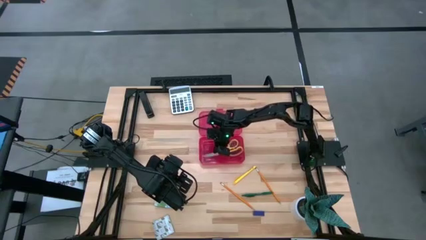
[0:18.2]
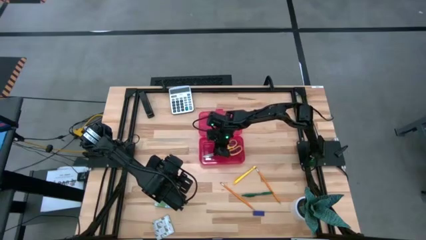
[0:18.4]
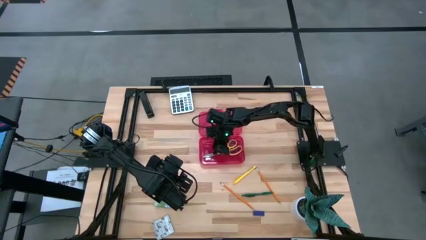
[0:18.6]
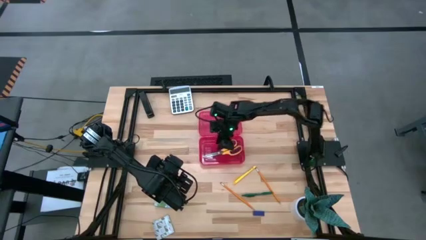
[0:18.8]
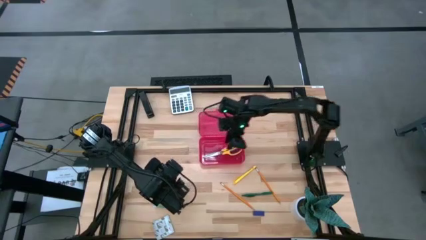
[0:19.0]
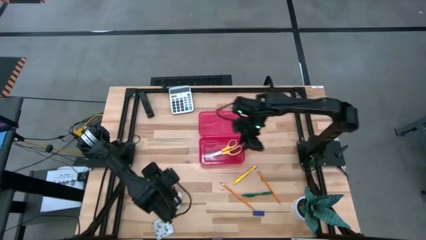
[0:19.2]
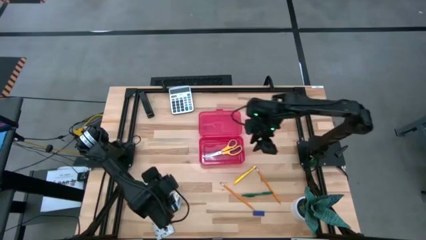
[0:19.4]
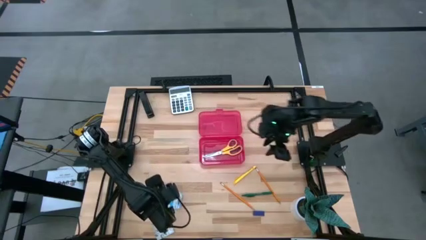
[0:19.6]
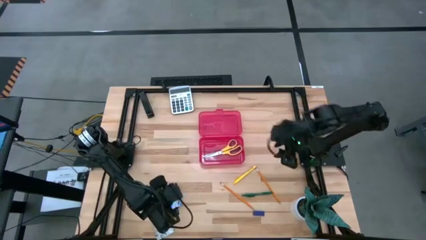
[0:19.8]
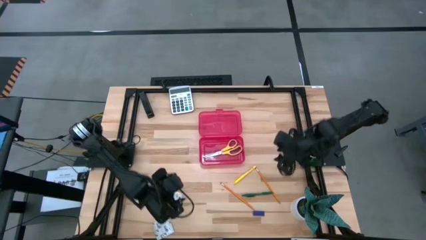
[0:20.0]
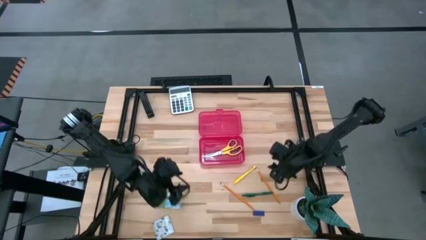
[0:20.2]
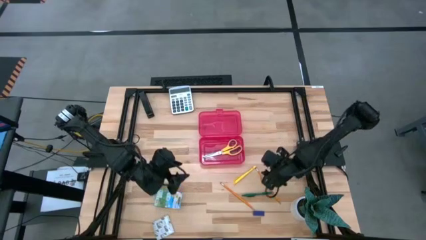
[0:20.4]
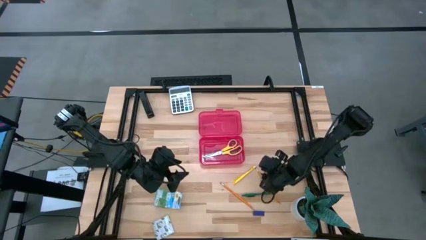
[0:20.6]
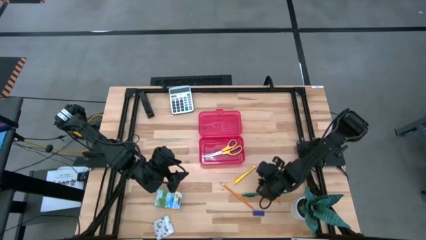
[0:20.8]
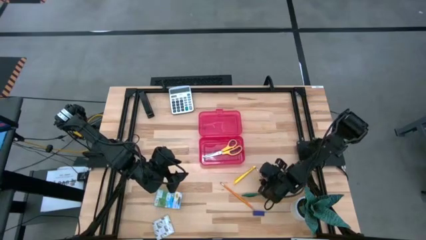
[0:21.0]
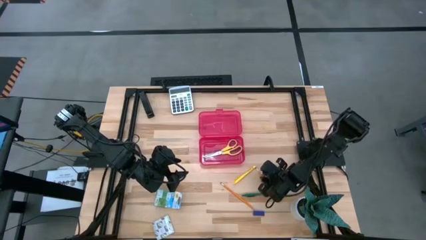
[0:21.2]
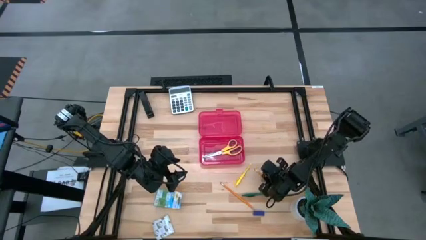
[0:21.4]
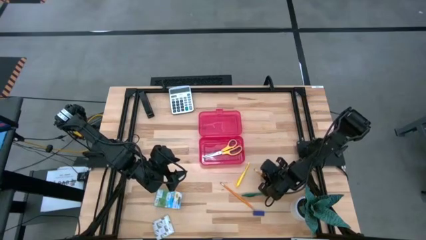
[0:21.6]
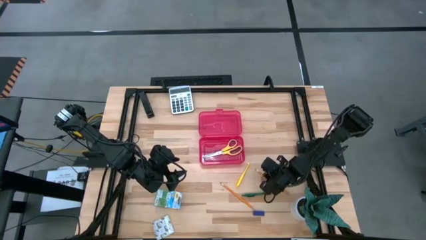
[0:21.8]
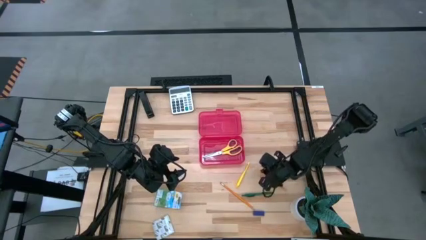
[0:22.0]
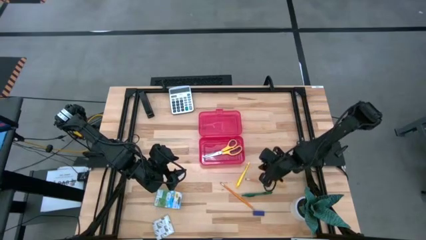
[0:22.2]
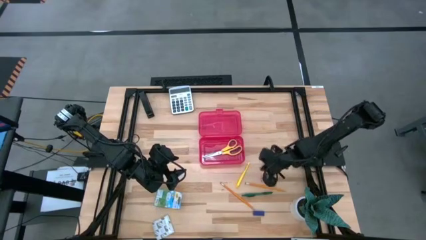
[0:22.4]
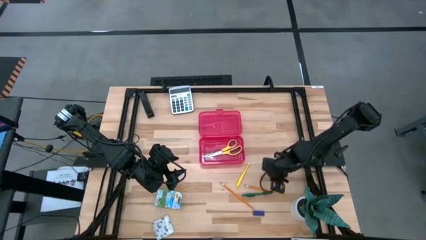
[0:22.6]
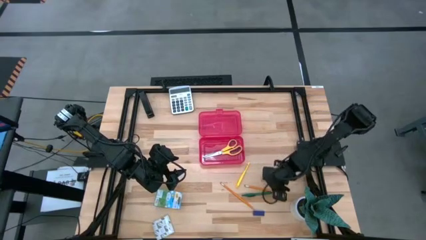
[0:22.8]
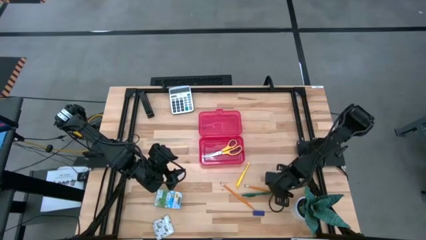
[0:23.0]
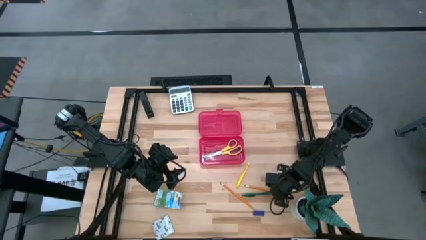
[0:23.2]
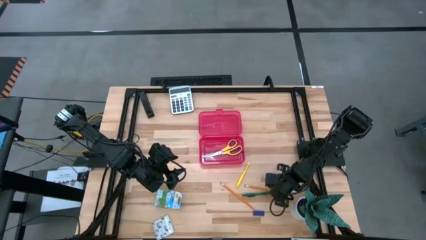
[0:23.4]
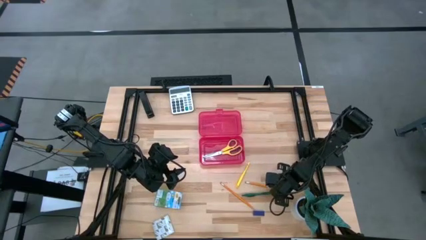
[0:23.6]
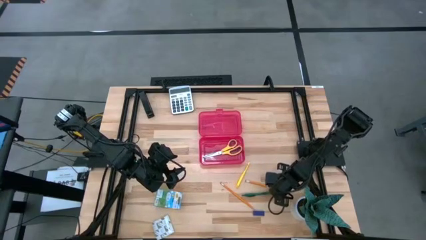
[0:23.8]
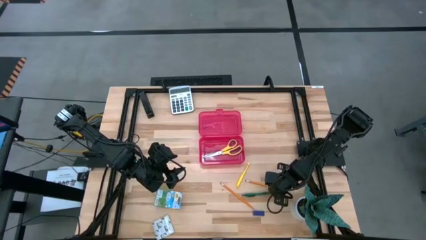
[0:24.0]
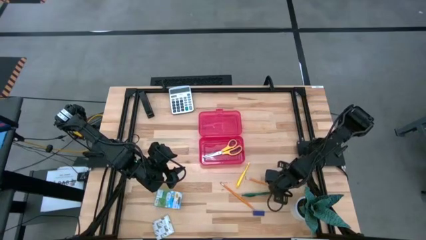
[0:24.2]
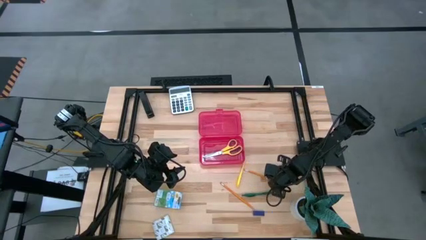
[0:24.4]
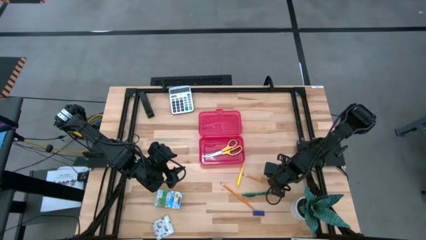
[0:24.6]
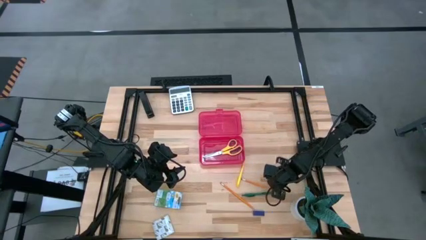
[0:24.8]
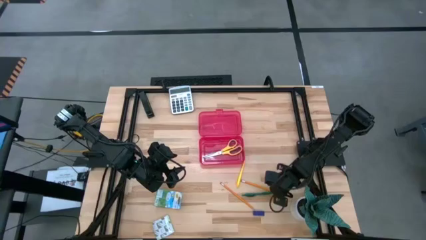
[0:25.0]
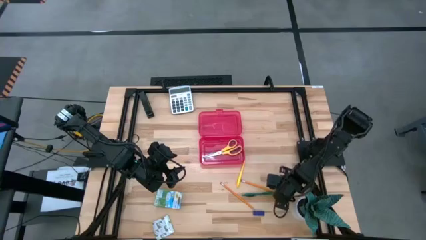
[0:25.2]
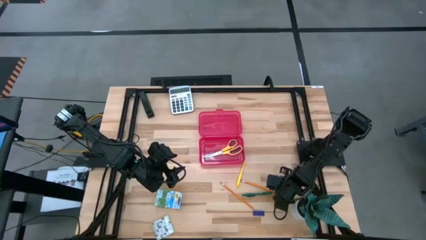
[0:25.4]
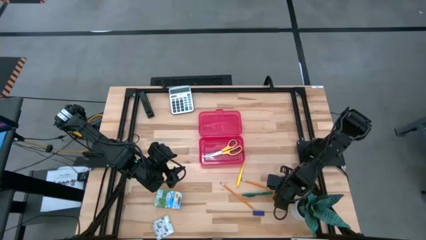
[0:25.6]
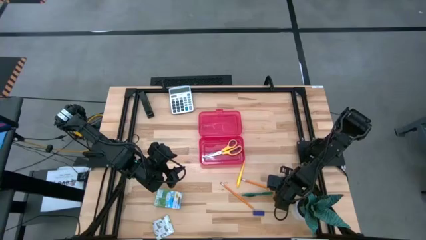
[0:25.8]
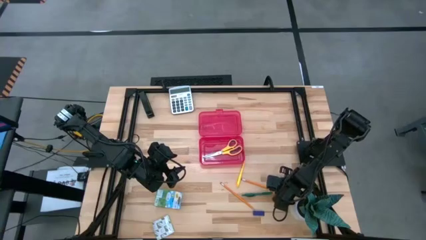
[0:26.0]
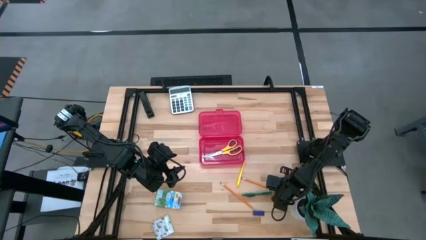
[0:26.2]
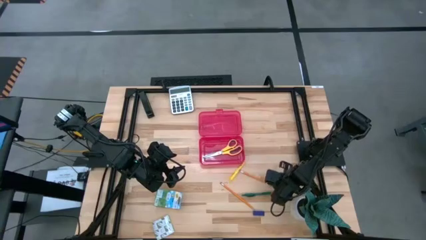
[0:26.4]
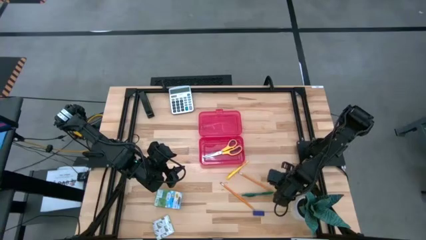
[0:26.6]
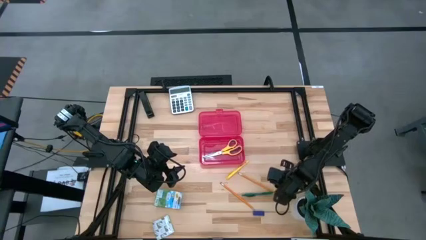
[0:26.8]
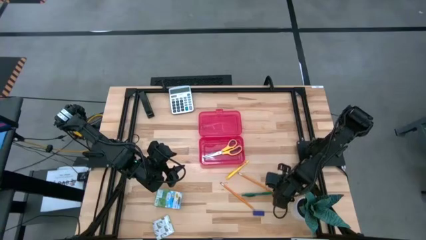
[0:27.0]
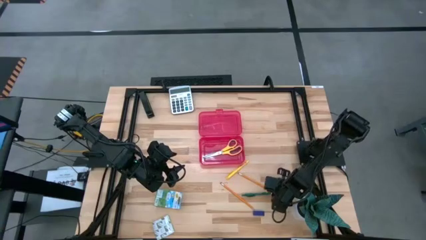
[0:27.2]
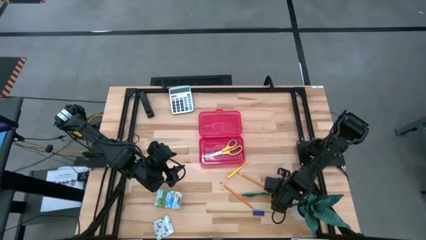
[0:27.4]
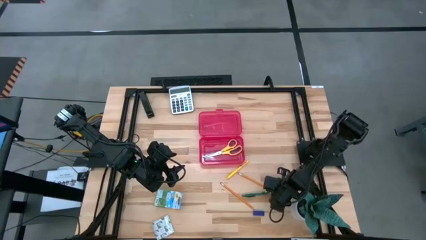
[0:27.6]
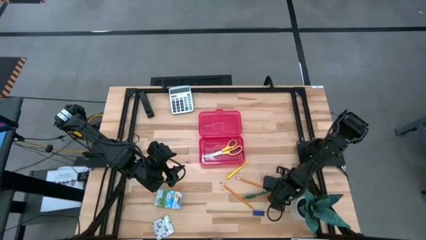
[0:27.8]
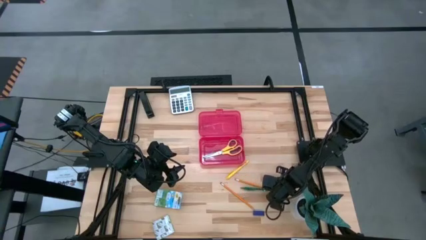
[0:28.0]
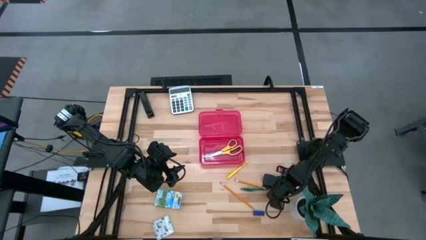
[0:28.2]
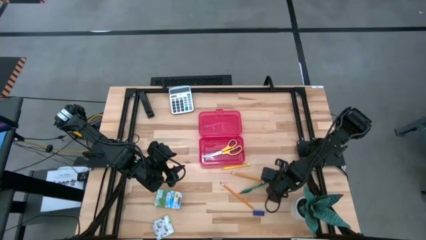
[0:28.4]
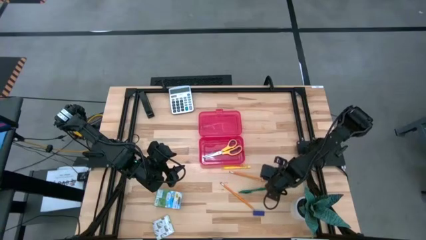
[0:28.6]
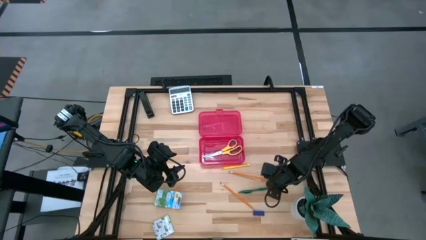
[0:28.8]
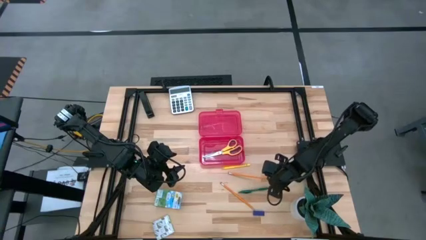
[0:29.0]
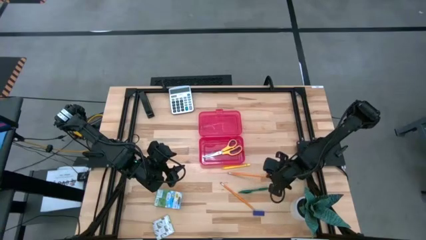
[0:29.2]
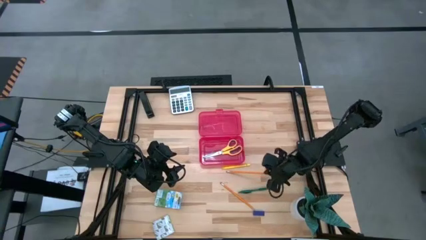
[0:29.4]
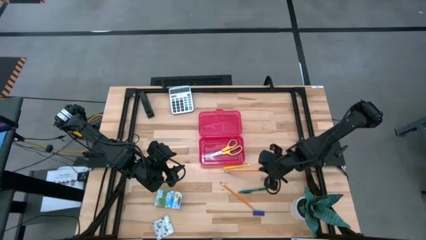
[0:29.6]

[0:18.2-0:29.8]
Task: Pack school essentials
Put the right orange pencil into the red supply box

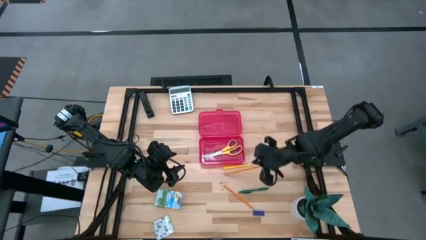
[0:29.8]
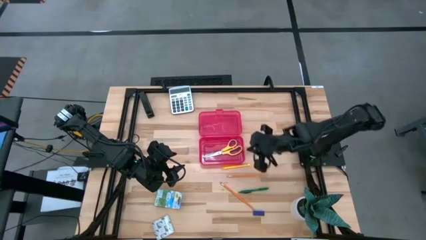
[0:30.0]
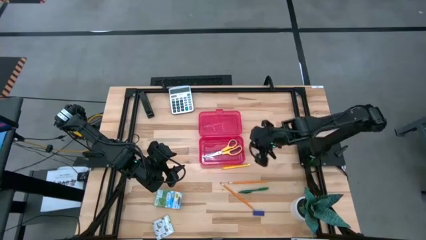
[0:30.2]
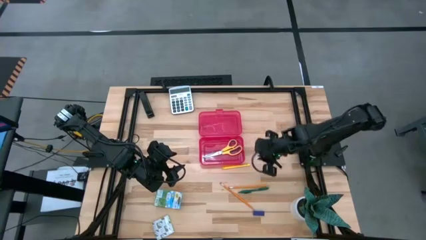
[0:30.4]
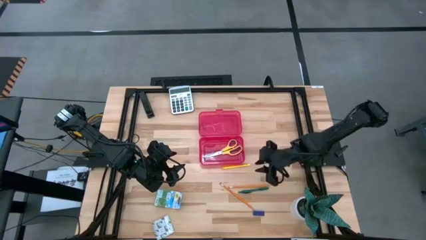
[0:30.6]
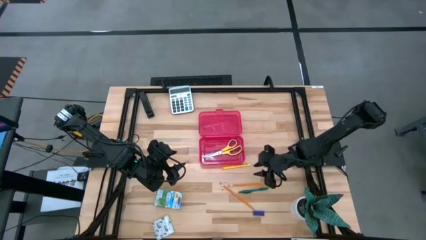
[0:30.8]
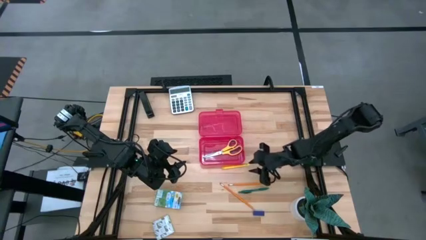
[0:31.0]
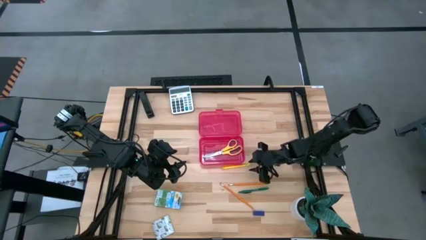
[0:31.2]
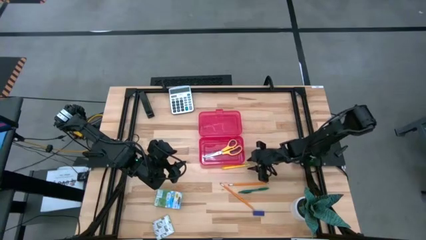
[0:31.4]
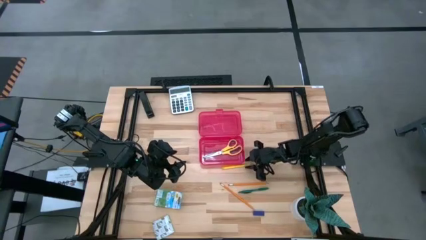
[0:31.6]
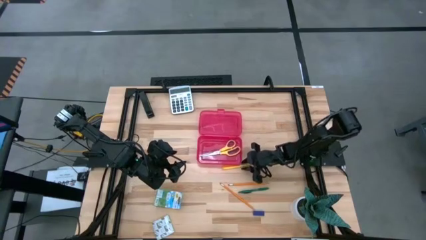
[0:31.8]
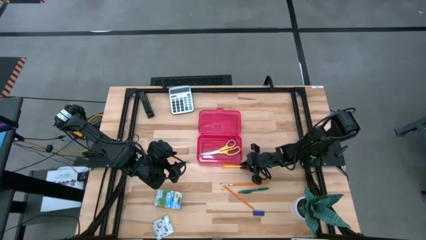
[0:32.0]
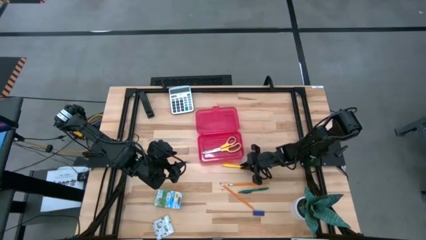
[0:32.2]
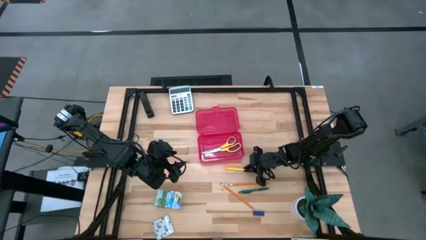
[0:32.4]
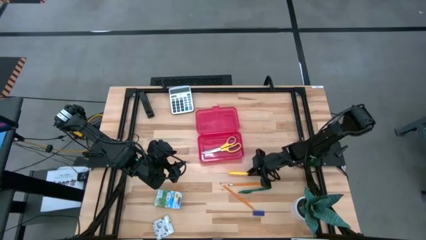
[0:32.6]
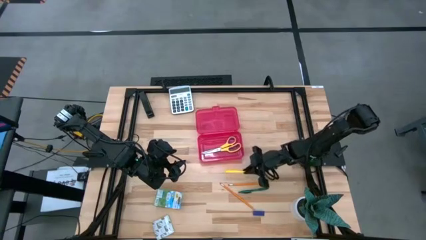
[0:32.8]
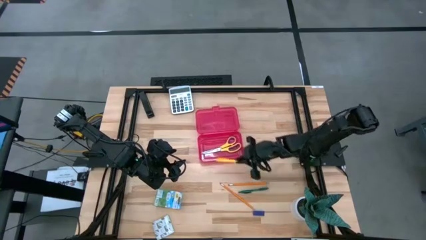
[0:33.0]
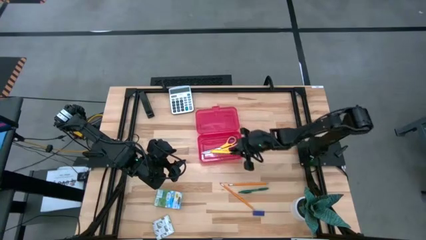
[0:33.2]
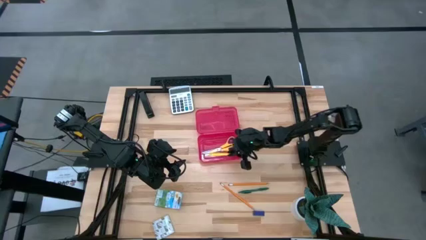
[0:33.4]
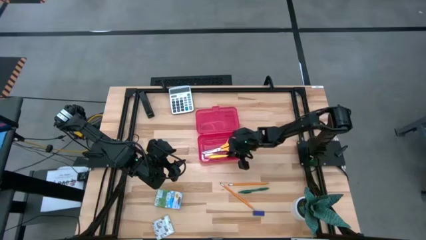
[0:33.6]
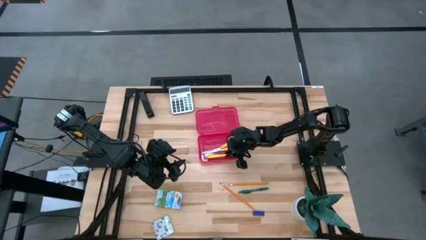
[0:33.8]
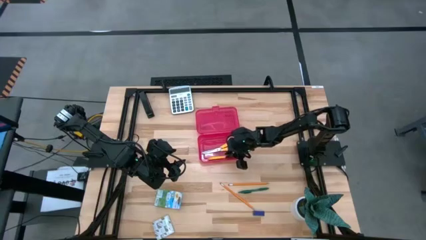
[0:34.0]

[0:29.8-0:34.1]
Put the yellow ballpoint pen into the red supply box

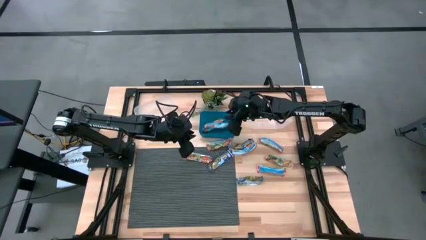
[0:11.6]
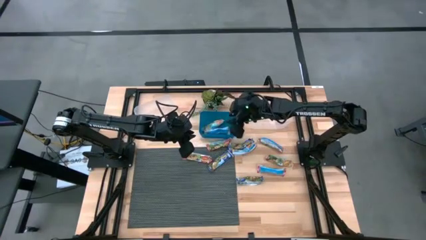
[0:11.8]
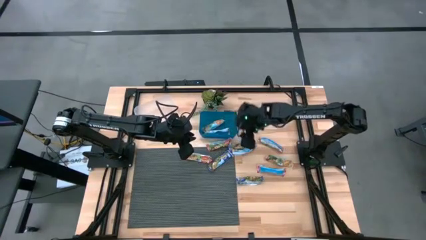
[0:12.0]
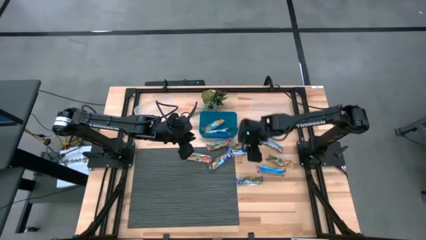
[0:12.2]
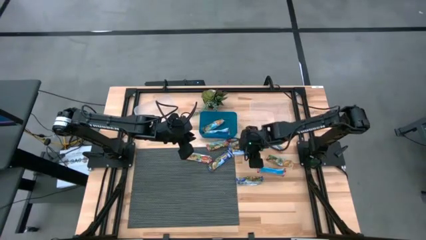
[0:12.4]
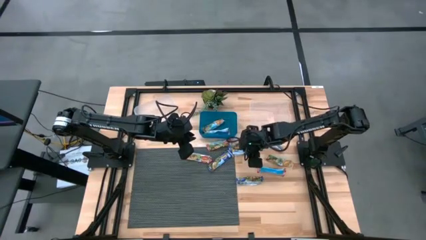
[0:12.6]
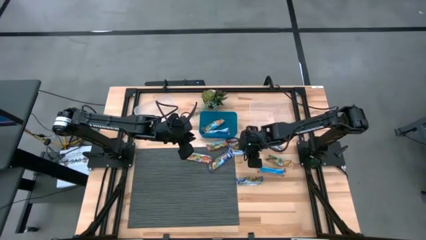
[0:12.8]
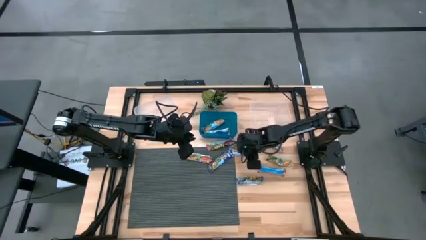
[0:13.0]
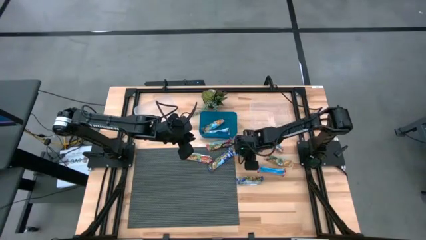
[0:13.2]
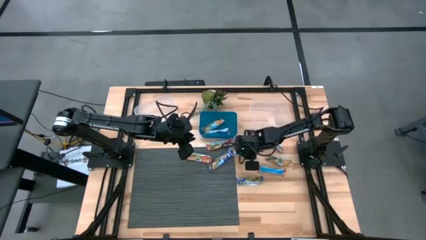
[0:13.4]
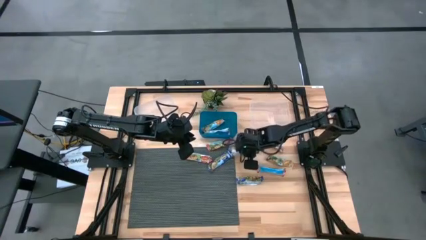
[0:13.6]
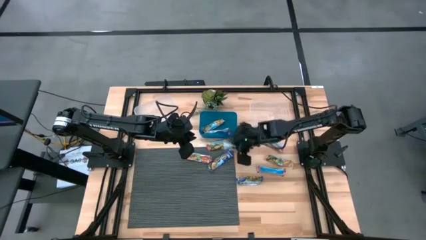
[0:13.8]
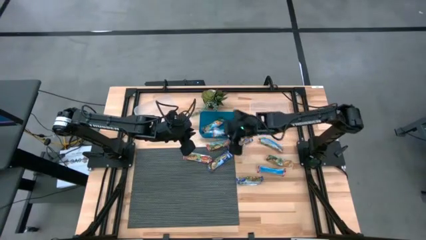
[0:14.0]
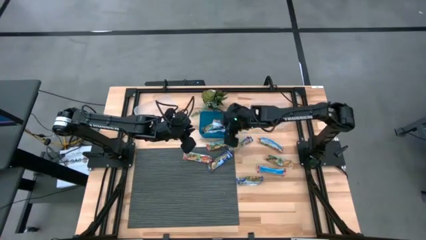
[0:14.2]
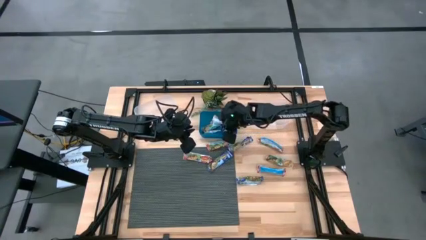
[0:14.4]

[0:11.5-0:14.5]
Task: Pick and place Granola Bars by type
Put the yellow granola bar into the blue bin
